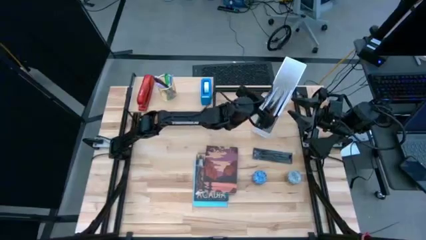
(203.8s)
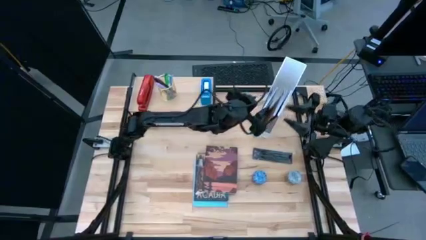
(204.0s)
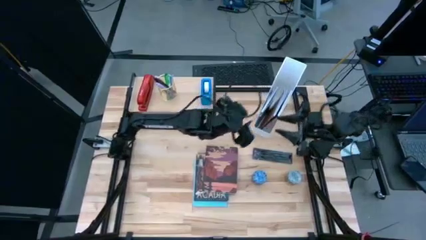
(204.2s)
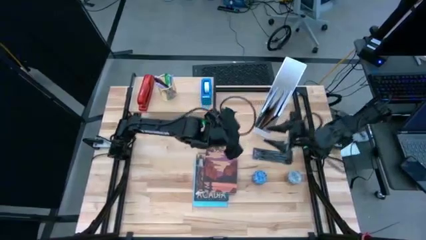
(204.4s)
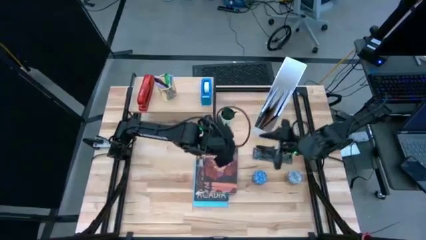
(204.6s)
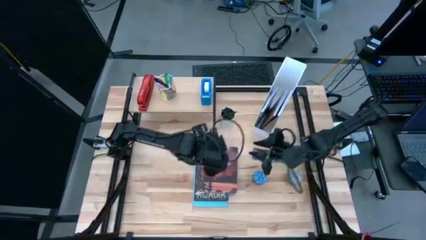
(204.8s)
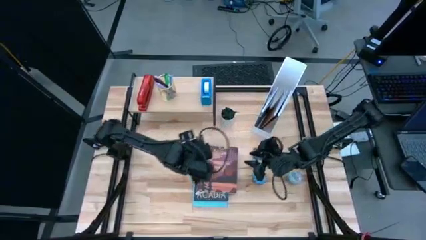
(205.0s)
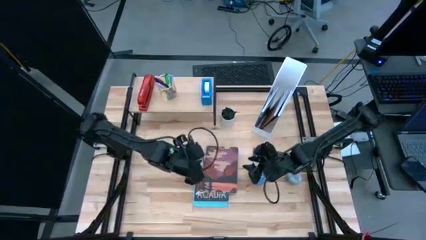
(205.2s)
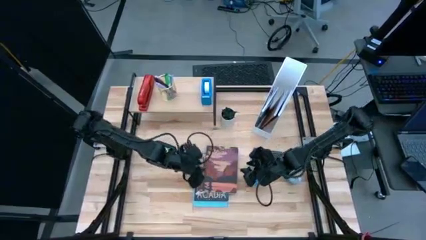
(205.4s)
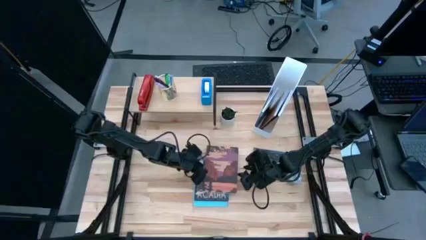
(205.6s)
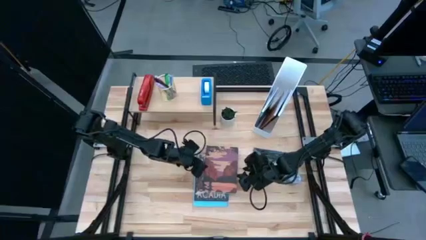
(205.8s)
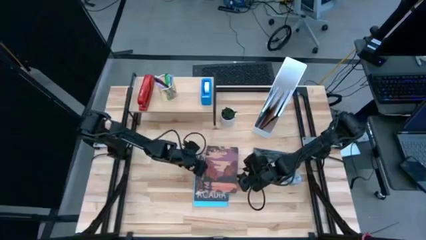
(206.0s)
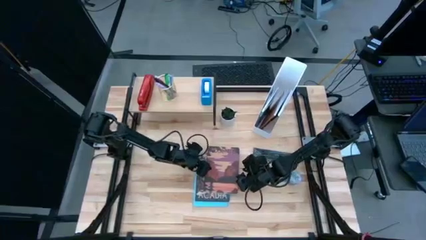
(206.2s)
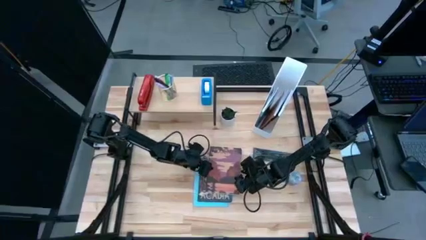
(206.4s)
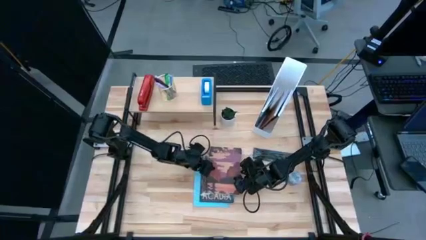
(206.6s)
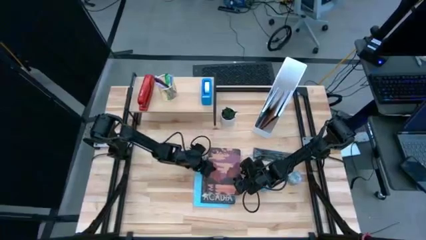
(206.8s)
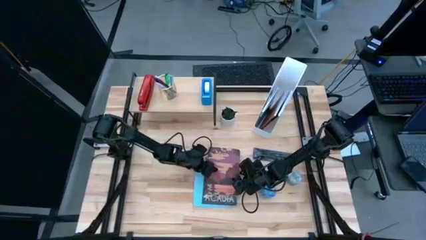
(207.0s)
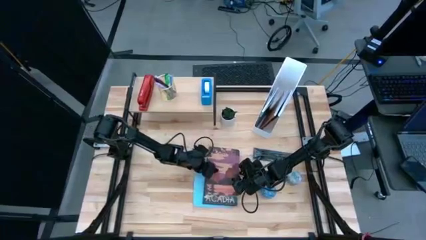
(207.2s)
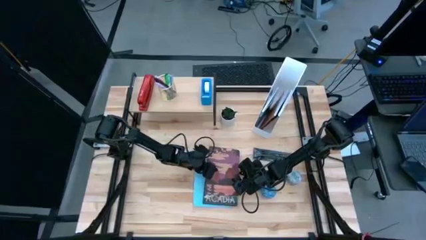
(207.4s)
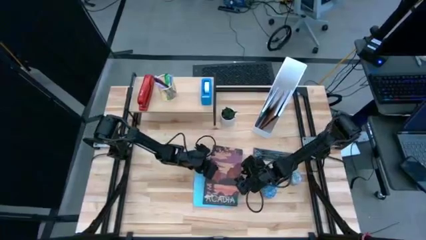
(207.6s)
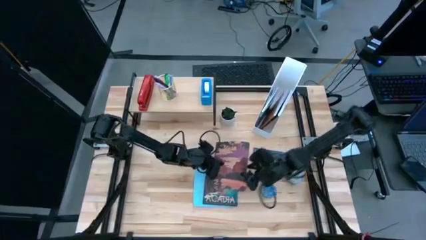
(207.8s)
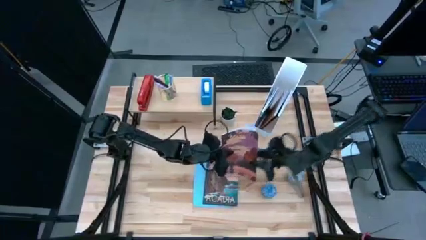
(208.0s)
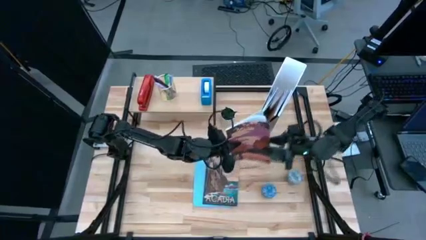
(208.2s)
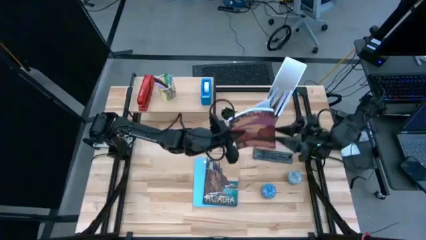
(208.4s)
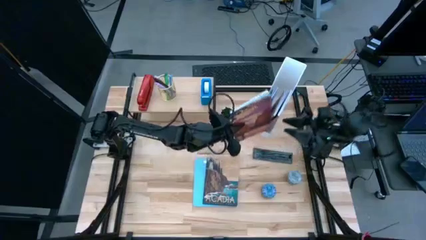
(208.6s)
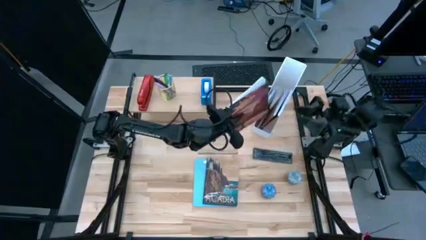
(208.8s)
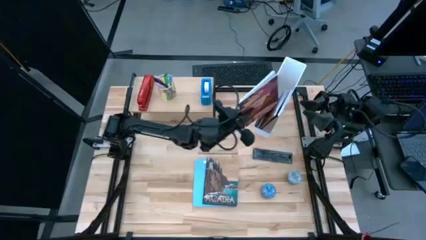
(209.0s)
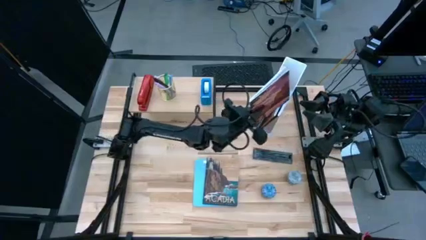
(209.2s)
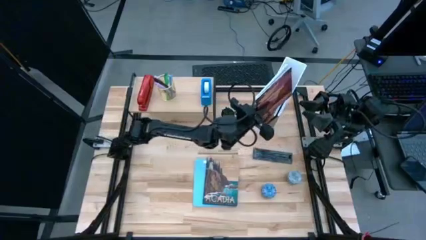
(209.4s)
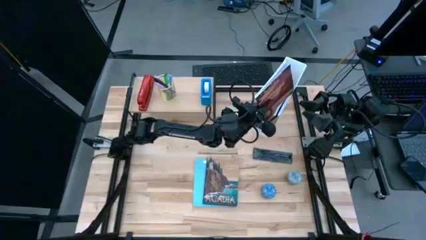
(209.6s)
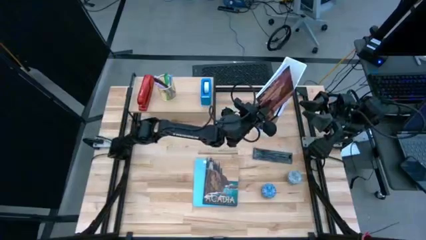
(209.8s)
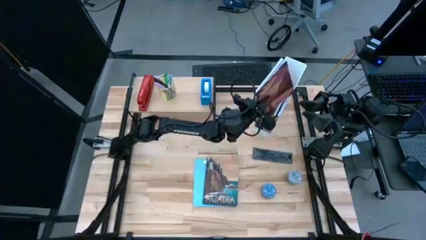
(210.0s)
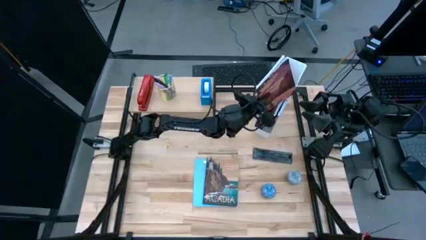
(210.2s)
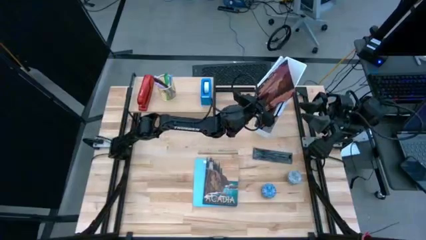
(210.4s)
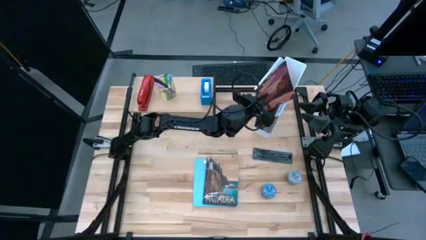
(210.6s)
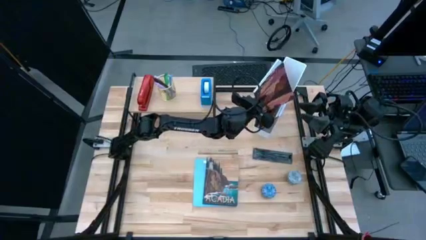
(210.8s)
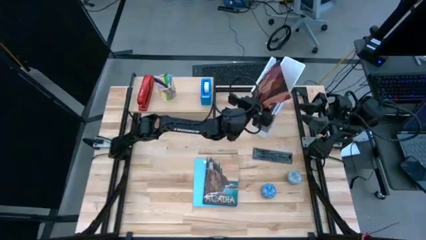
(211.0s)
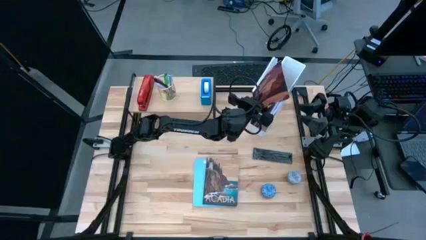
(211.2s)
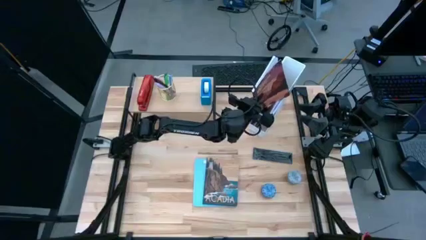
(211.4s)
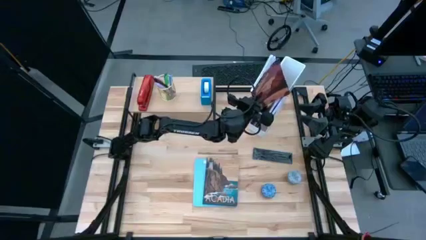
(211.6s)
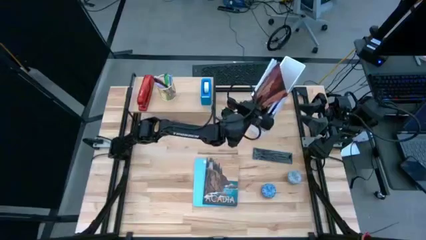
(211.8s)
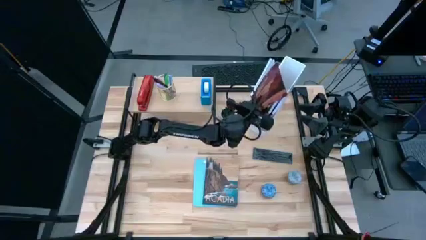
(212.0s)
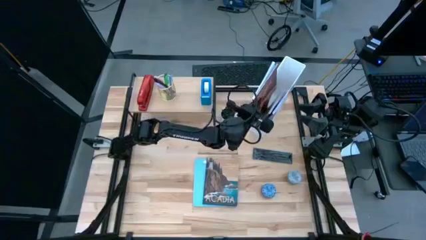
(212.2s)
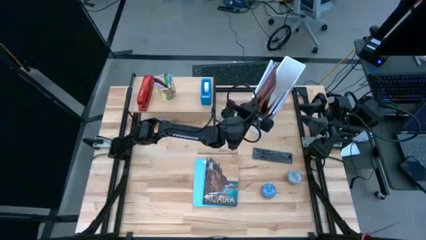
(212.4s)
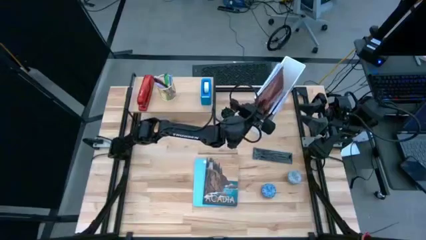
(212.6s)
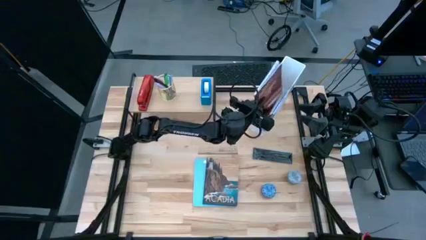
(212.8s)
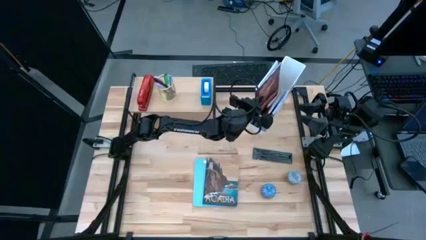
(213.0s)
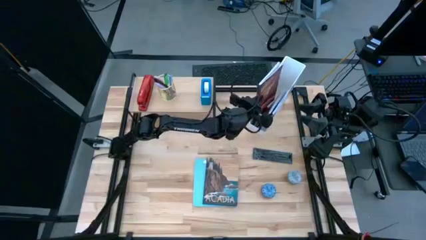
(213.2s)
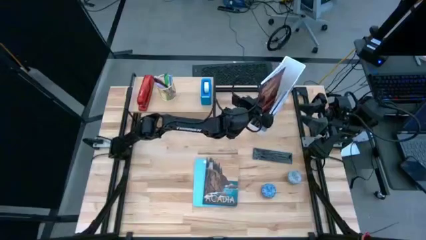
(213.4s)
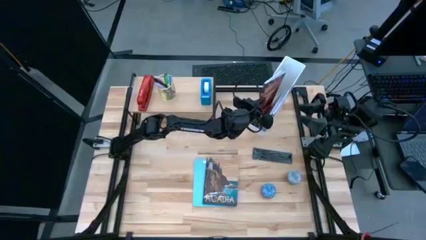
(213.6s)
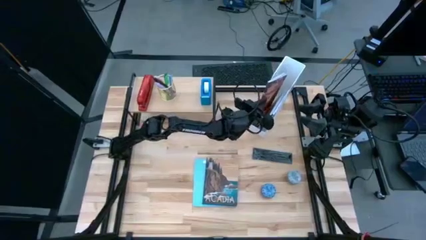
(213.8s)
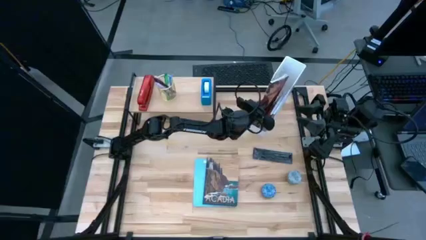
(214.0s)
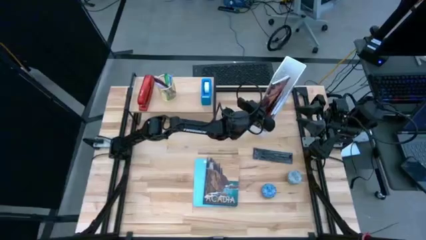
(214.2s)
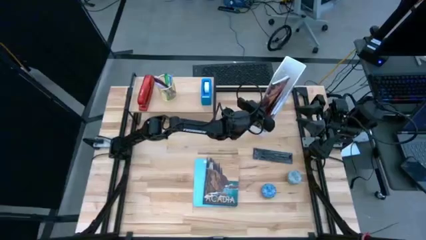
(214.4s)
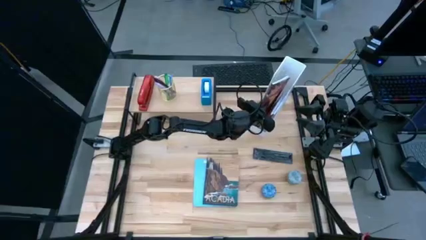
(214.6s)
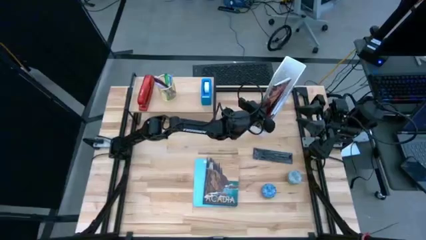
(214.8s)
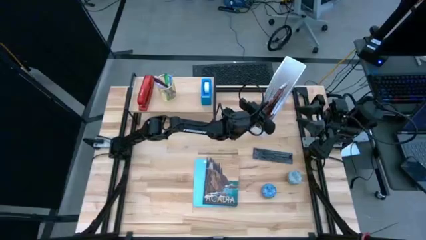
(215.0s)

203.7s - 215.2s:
Task: Stock shelves
Put the purple/brown book into the white book shelf

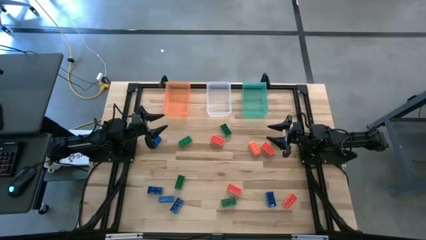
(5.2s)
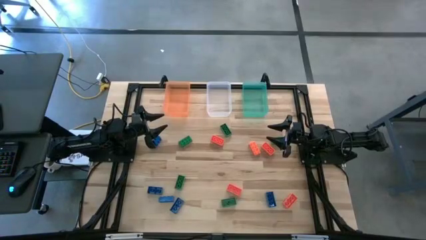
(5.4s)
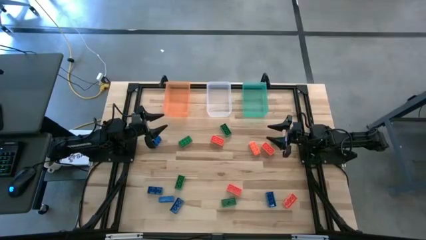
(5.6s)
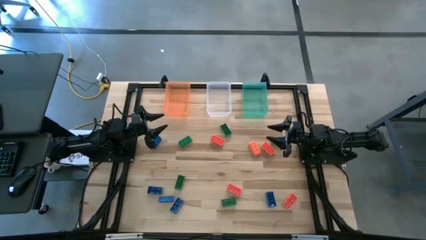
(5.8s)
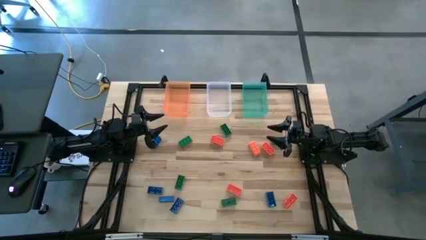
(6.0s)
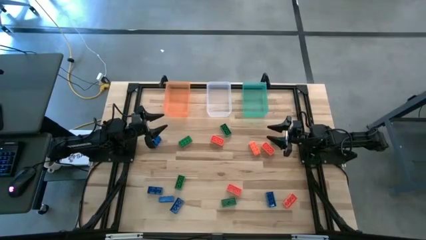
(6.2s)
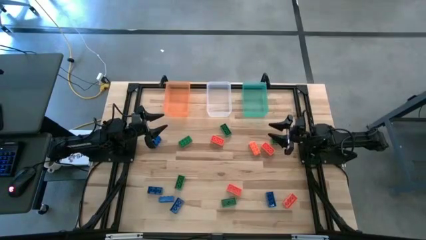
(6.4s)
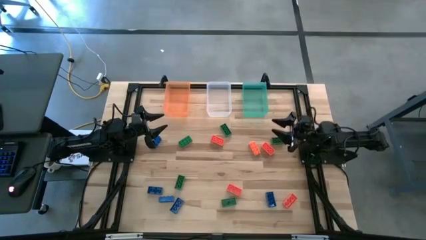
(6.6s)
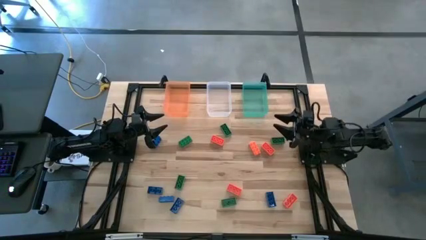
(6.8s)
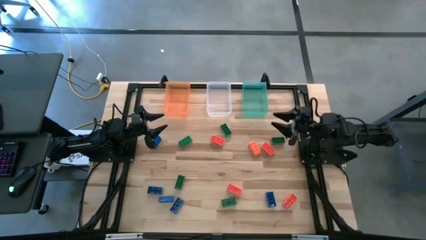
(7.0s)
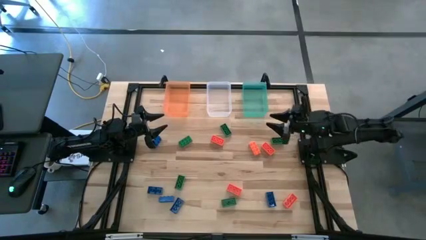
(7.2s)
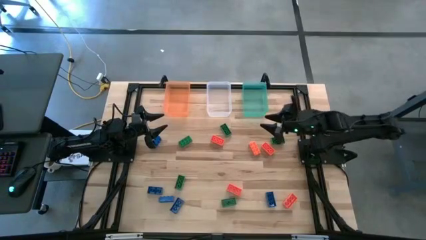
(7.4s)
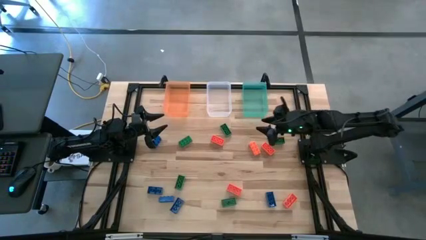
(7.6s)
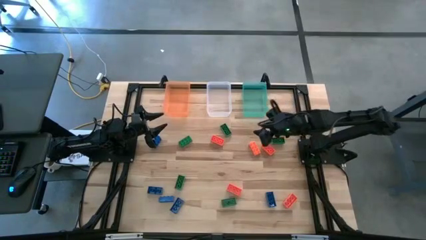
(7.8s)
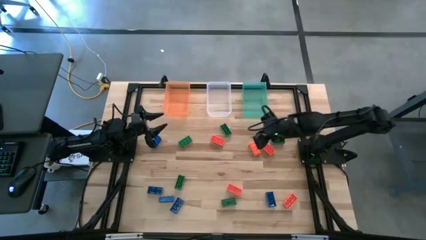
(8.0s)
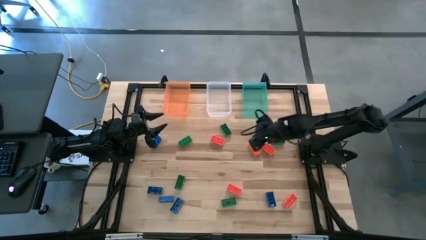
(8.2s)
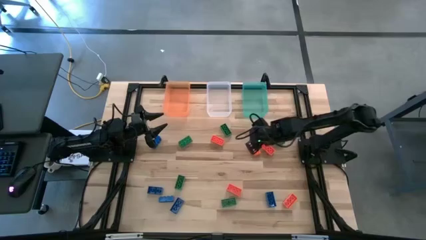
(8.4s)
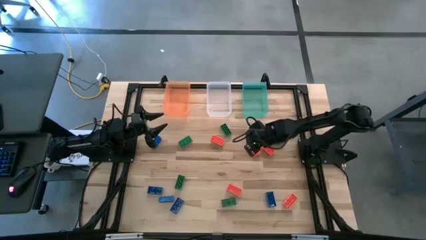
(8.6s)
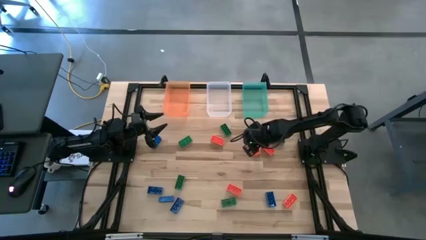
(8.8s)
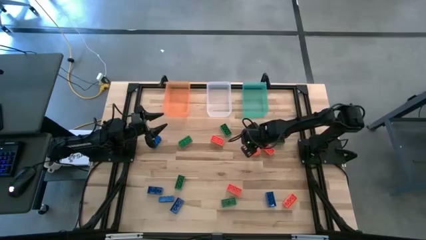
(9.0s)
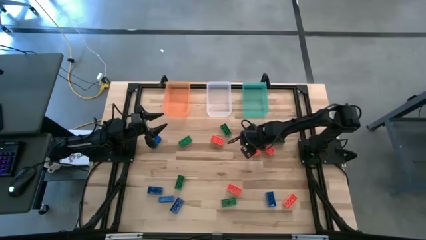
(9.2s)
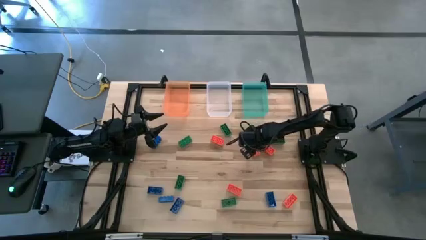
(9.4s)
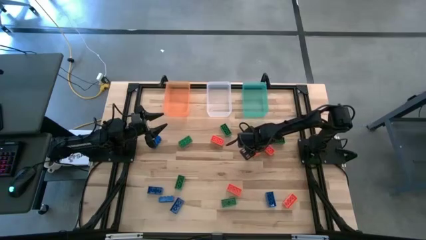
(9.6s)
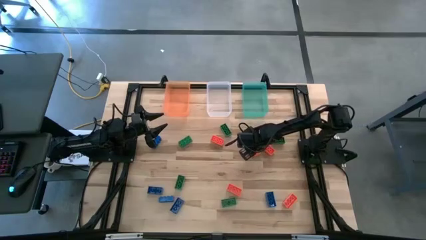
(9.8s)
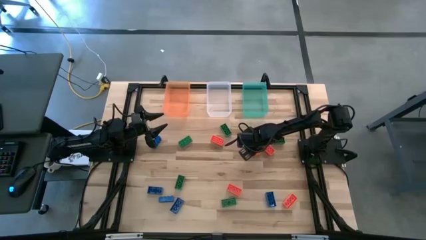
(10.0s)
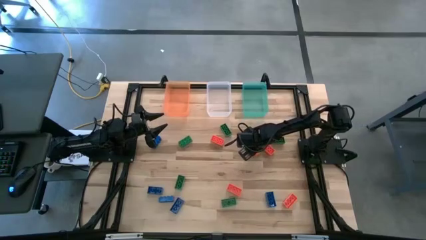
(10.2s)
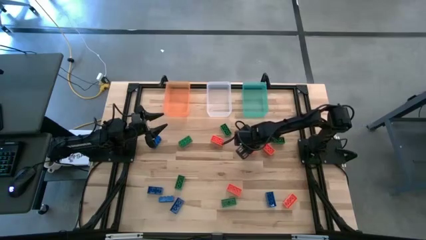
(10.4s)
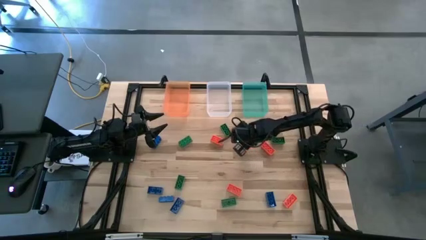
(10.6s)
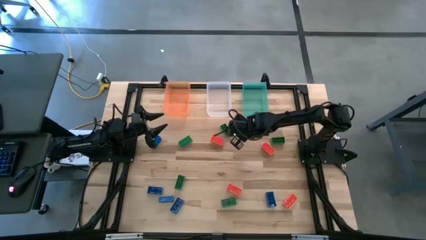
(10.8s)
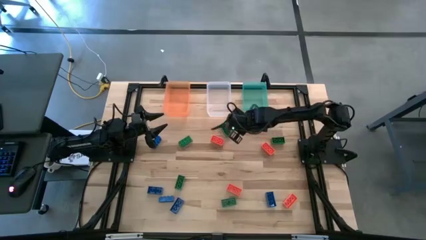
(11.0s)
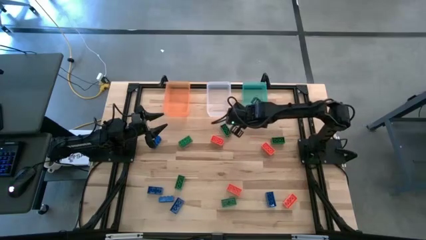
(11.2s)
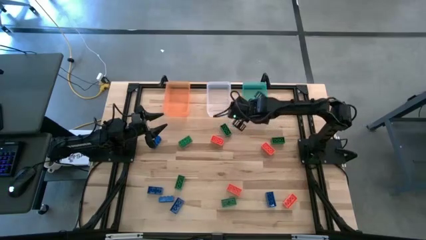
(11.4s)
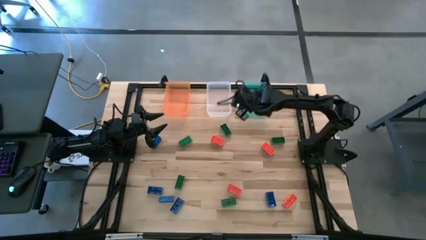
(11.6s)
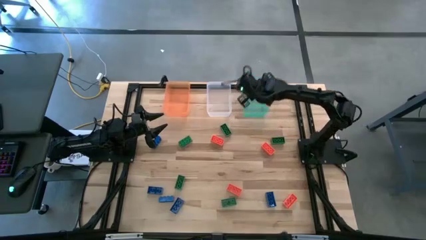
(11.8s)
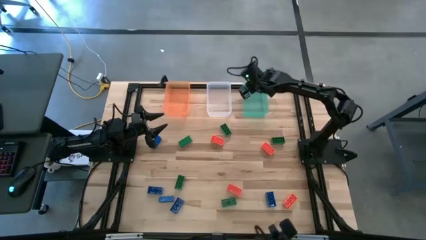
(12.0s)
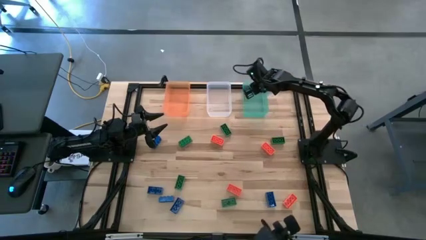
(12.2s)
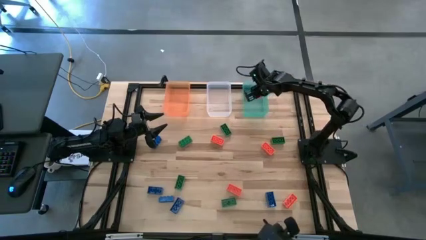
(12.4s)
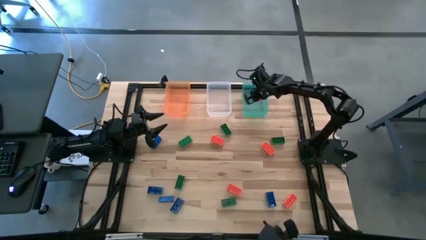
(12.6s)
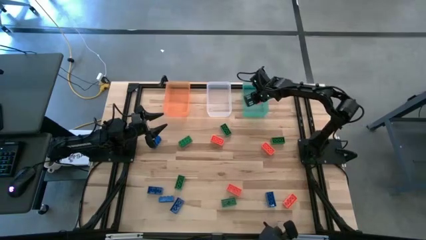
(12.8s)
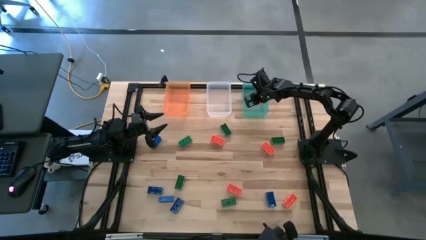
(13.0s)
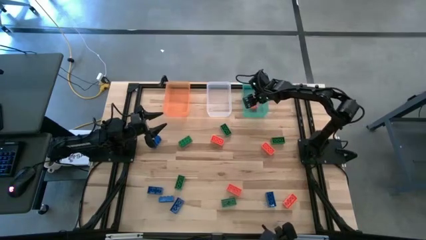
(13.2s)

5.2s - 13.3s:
Task: Sort & place blocks by color
Put the orange game piece into the green bin
